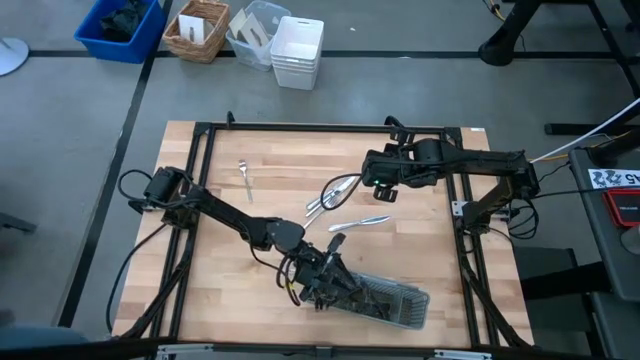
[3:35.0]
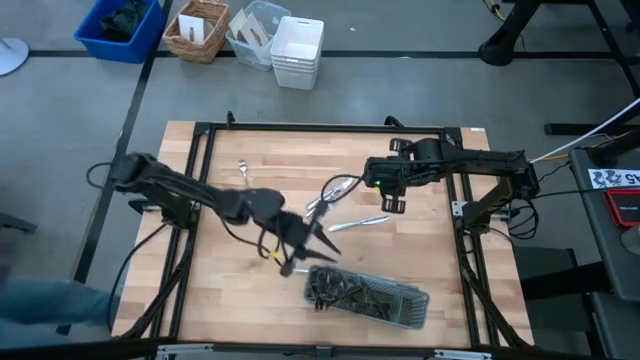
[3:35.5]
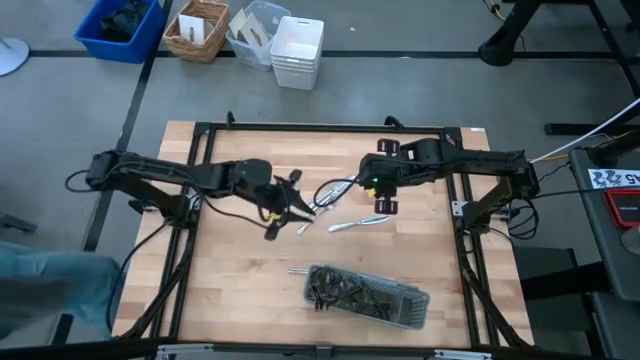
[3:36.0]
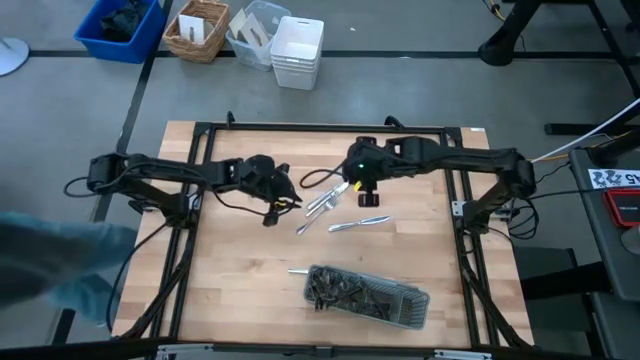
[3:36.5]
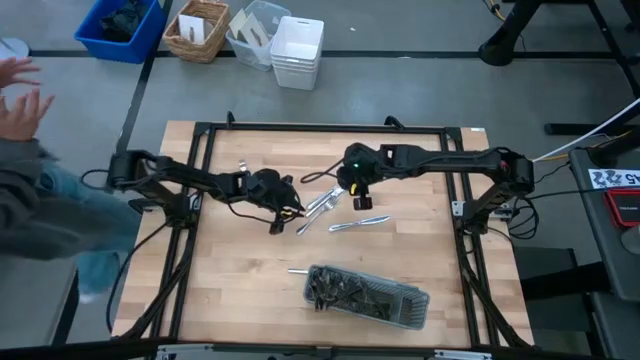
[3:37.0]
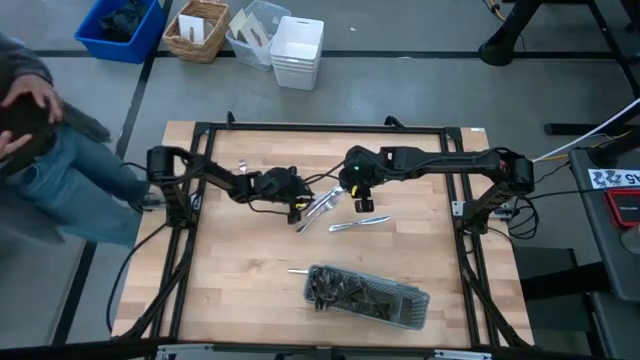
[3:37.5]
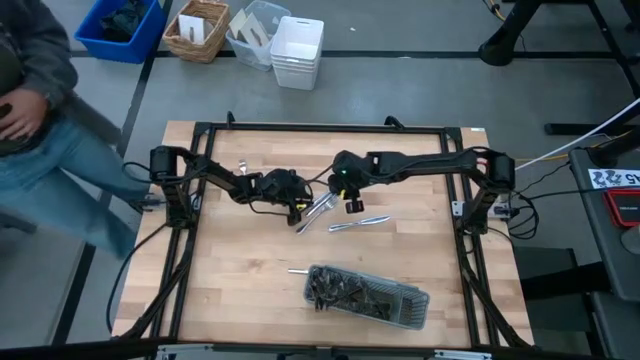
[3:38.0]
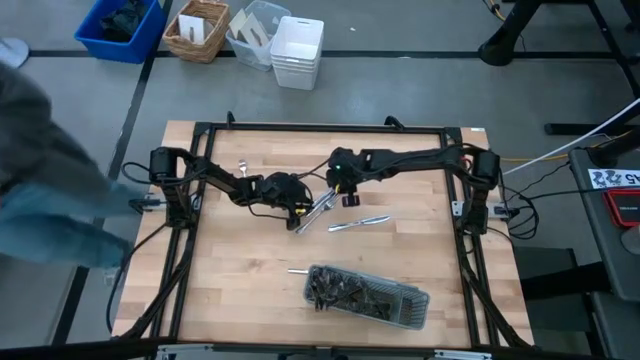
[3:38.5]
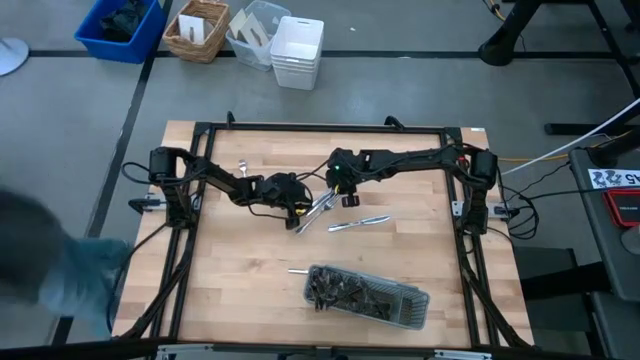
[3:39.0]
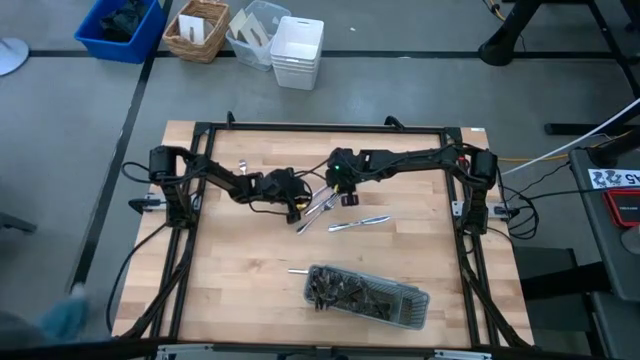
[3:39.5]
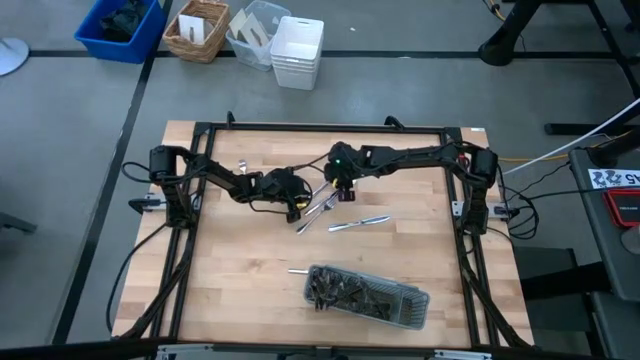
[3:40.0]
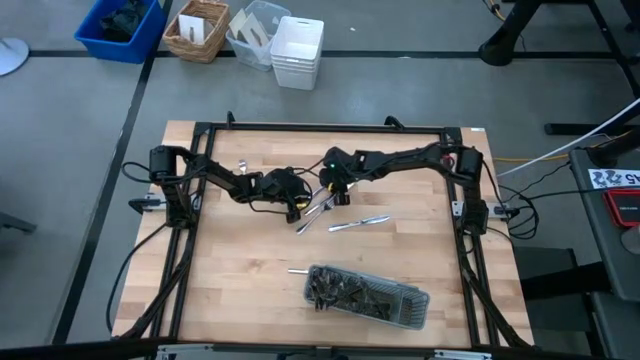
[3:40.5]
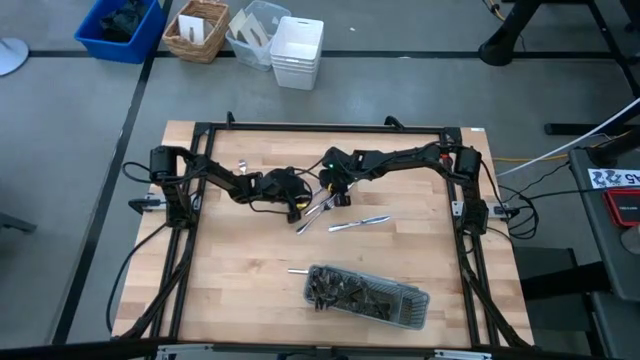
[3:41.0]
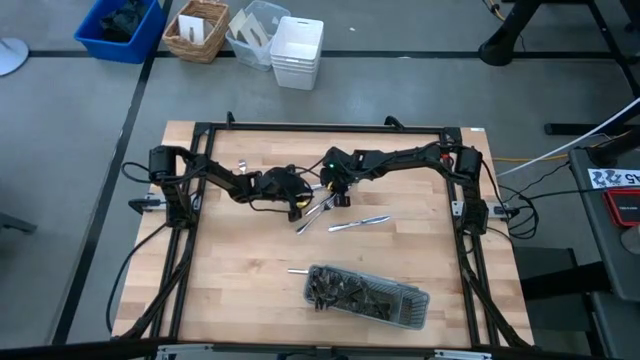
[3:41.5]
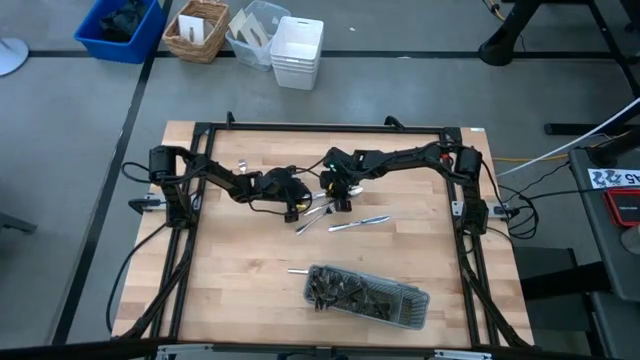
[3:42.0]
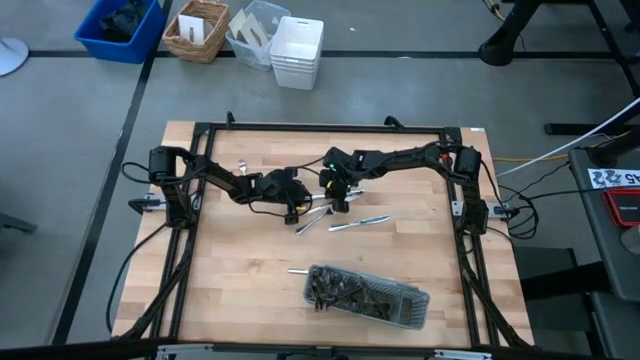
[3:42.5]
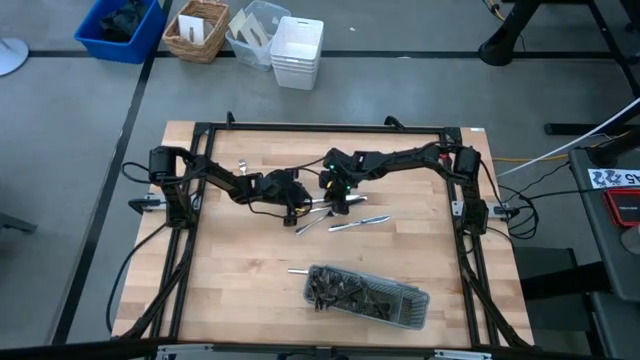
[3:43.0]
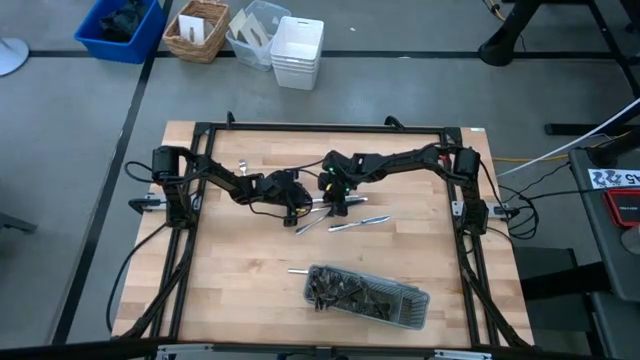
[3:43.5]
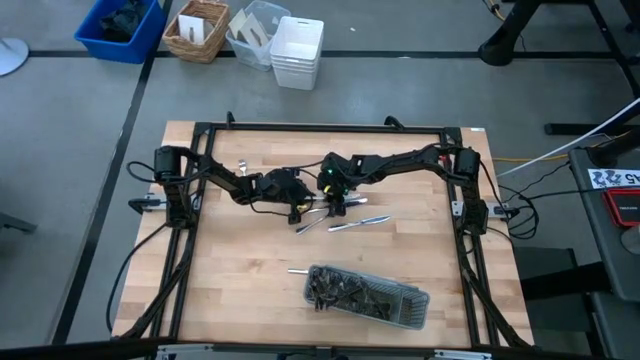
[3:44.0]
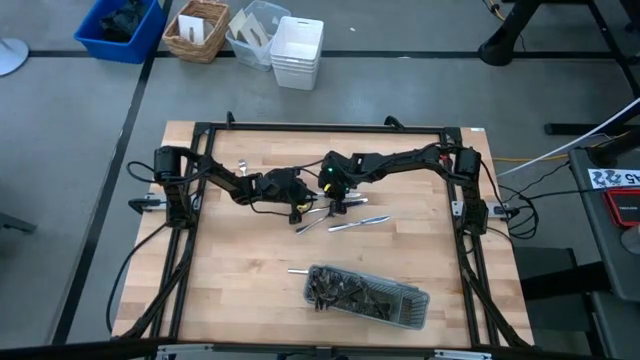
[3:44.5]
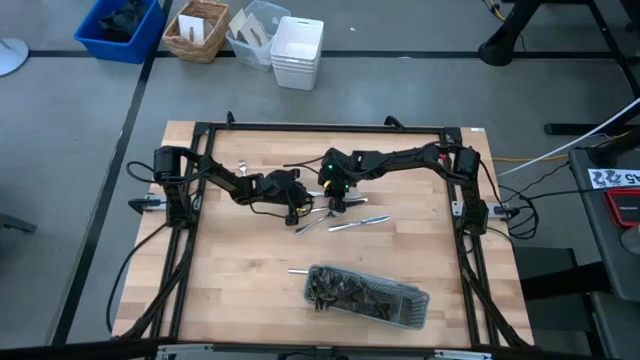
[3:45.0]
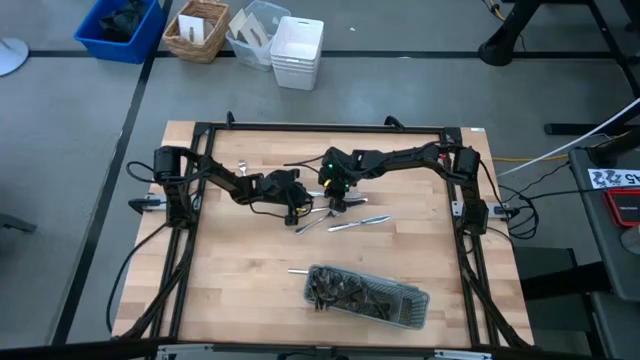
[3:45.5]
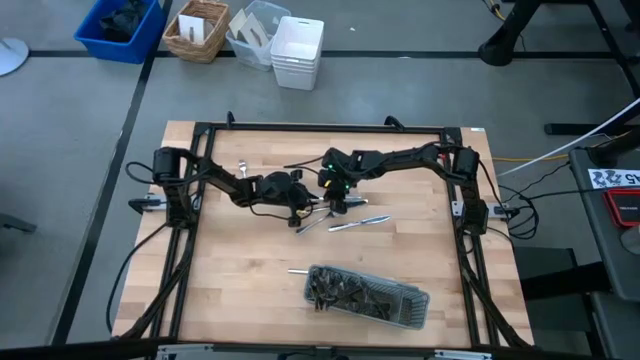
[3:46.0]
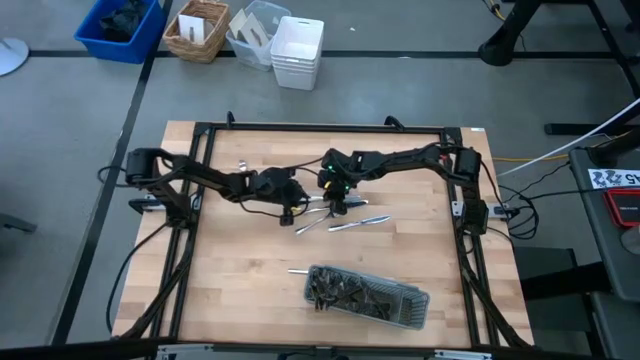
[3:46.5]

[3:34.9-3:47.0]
Task: Sort silverware
Put the knife into the gray silverware rack

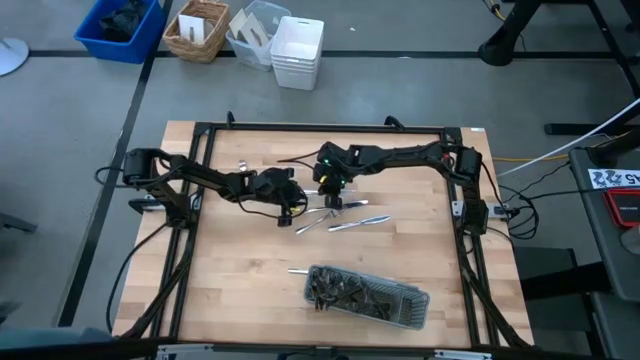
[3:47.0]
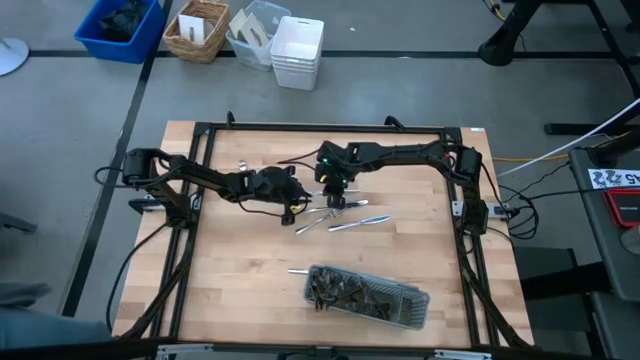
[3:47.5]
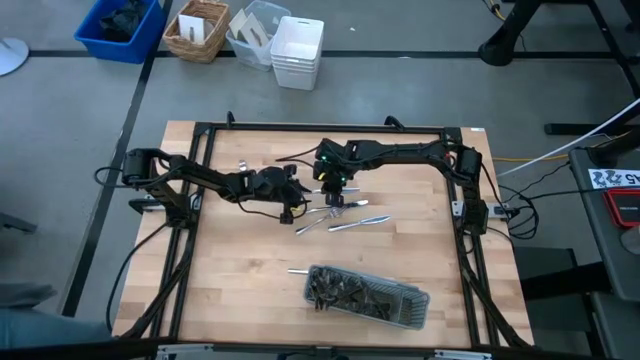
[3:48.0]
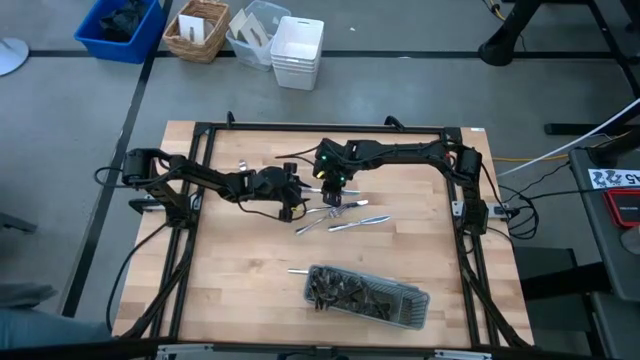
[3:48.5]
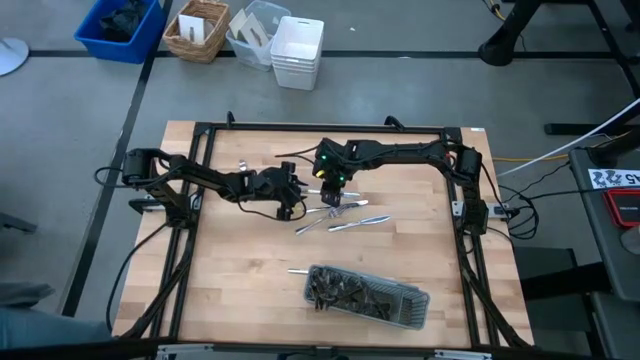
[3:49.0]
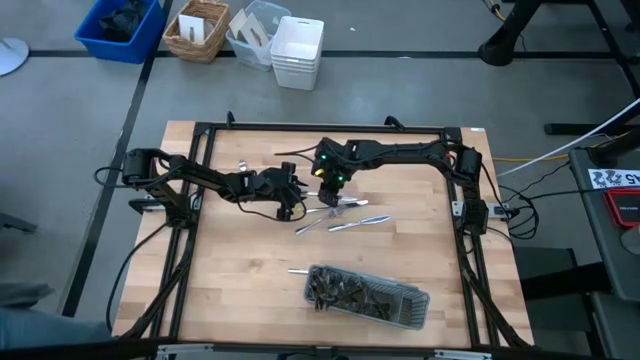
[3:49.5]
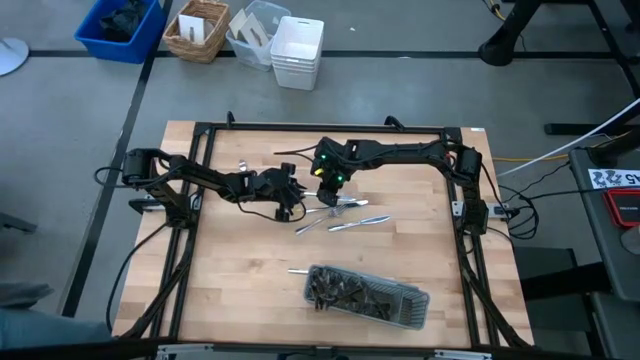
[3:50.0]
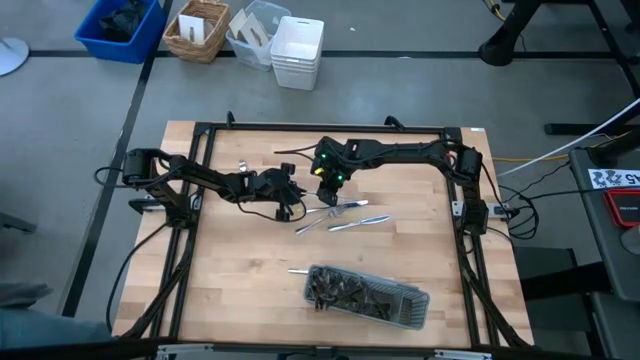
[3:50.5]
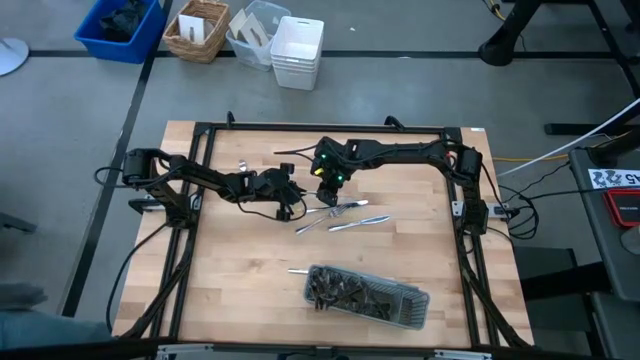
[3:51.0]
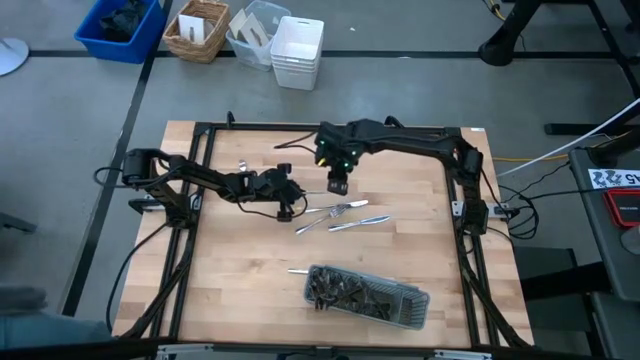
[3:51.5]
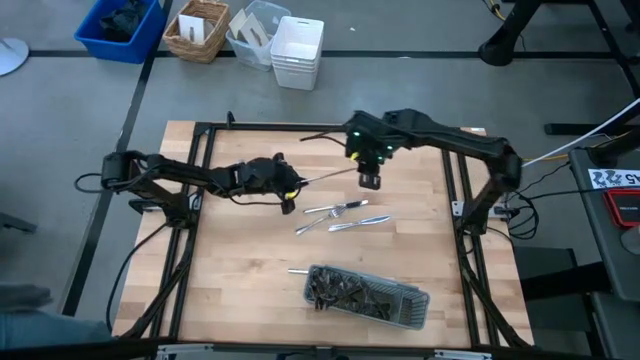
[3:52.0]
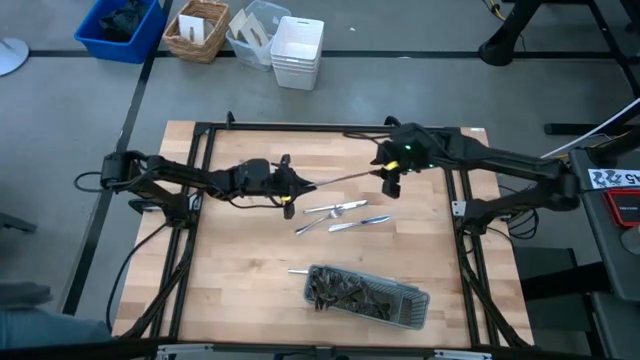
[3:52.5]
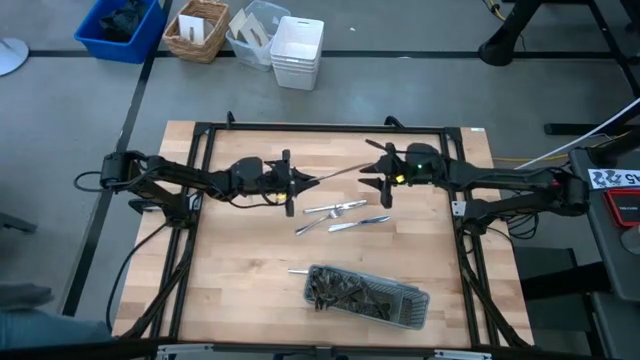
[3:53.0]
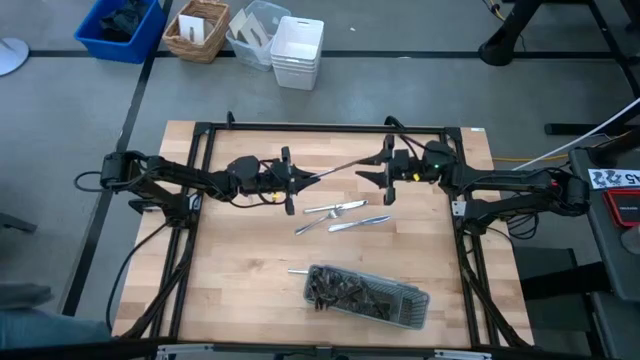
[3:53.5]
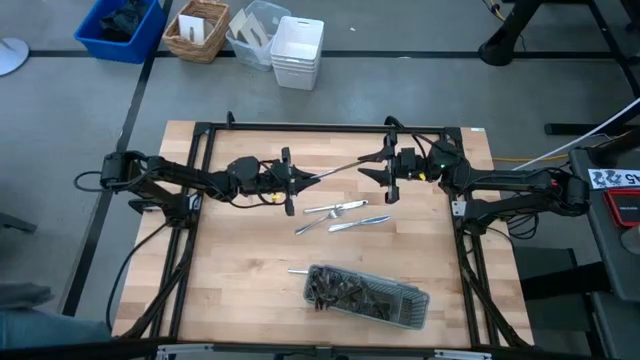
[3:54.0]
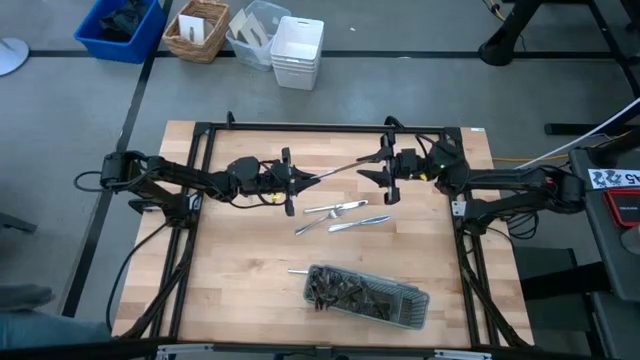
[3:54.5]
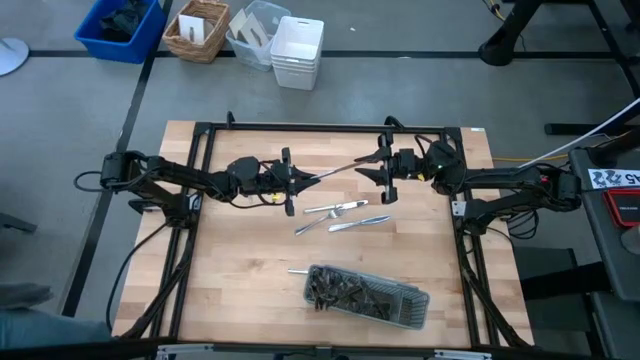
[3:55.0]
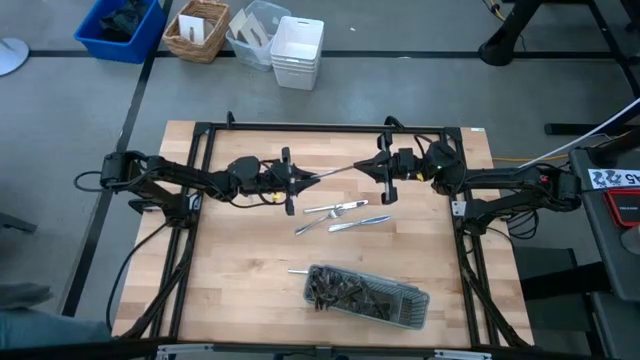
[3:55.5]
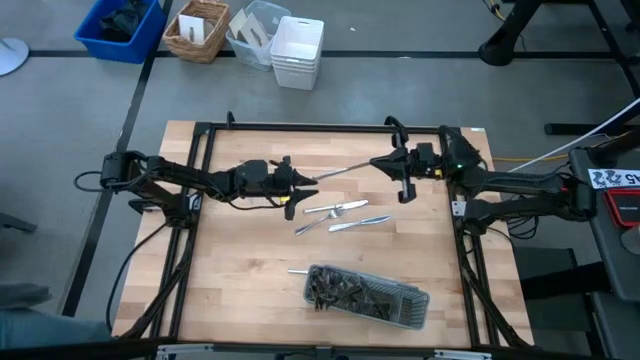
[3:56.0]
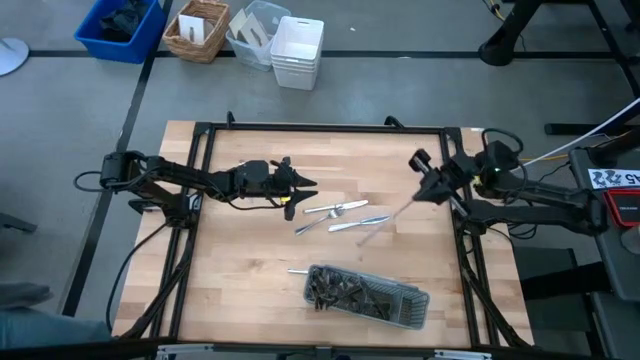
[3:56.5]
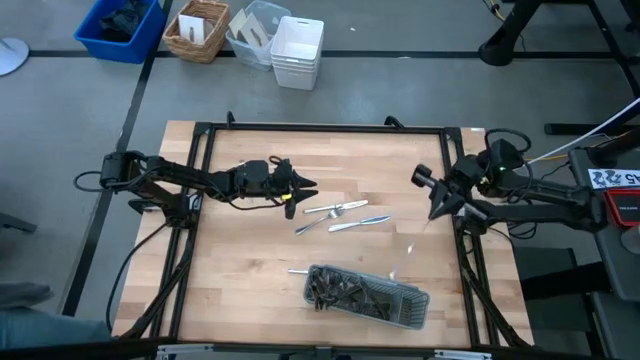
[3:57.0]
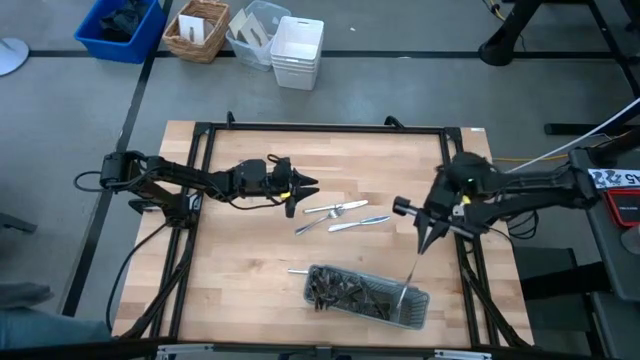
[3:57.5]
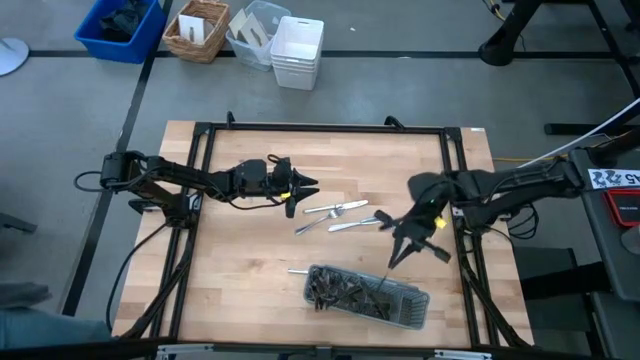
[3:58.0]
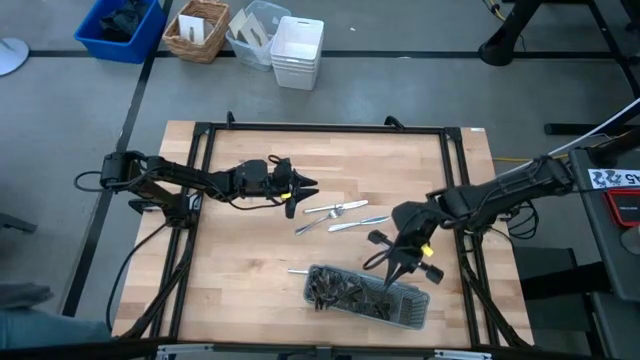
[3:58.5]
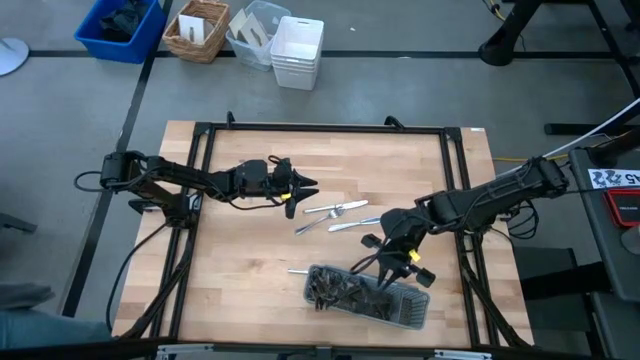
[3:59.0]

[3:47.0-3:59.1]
Put the knife into the gray silverware rack
